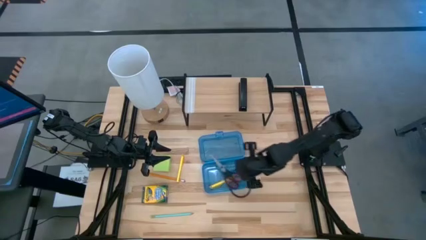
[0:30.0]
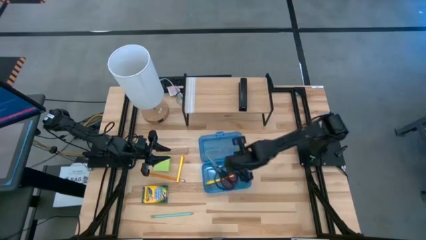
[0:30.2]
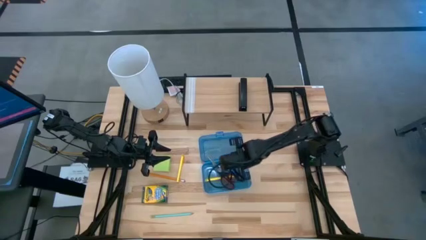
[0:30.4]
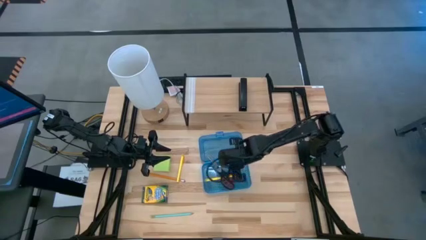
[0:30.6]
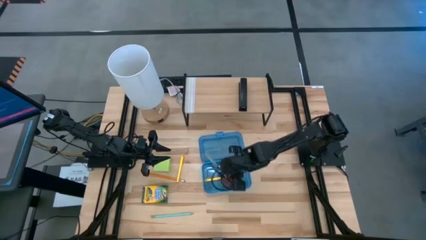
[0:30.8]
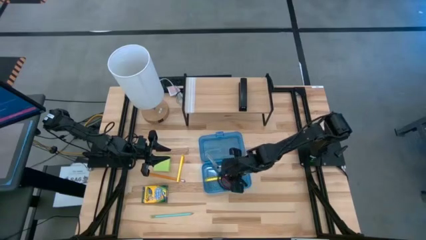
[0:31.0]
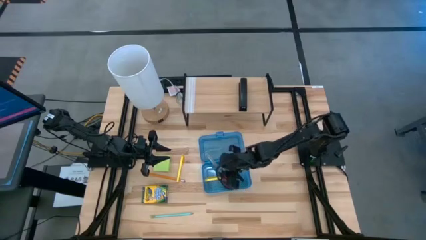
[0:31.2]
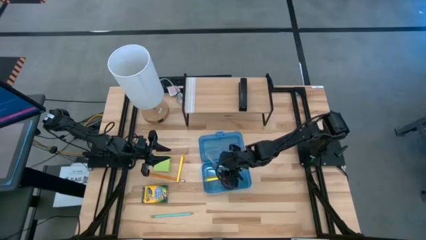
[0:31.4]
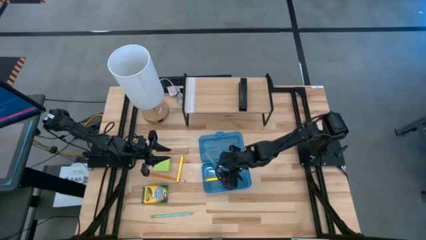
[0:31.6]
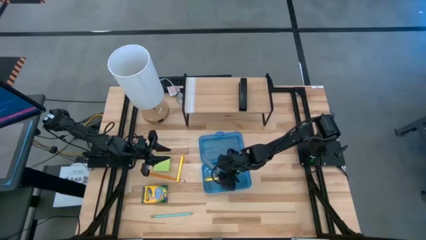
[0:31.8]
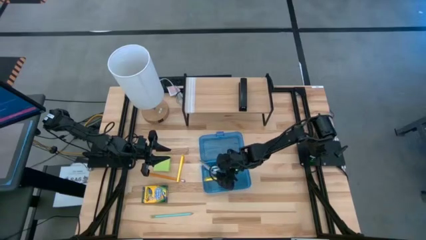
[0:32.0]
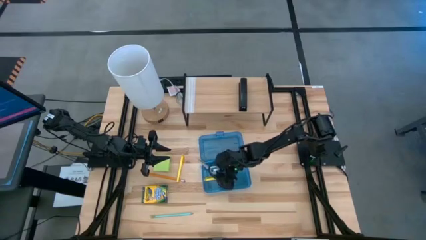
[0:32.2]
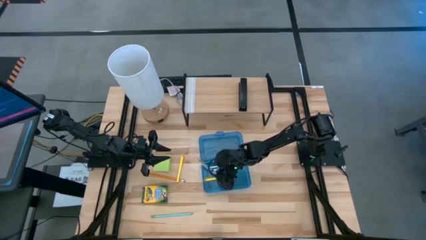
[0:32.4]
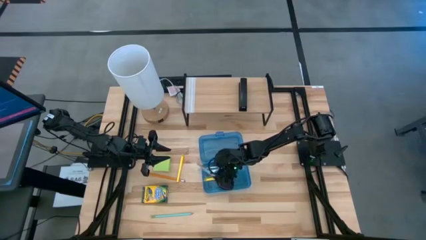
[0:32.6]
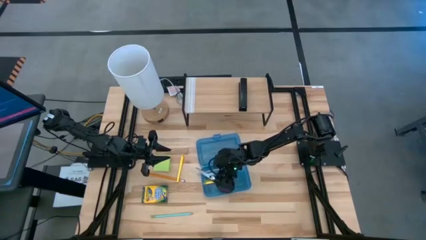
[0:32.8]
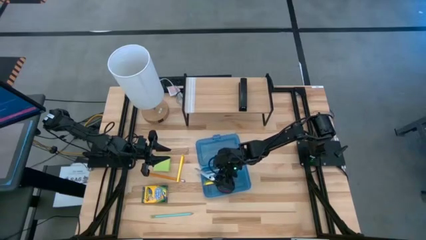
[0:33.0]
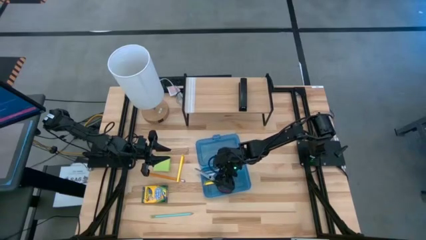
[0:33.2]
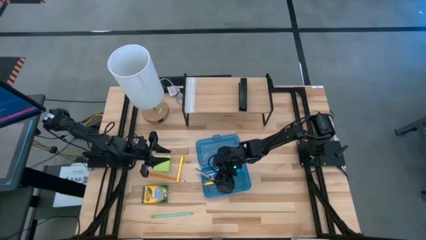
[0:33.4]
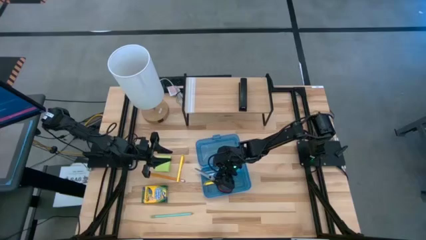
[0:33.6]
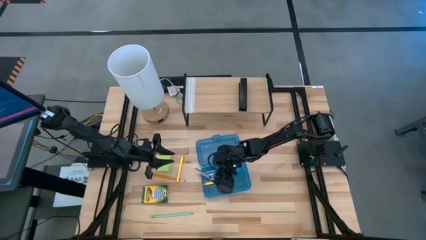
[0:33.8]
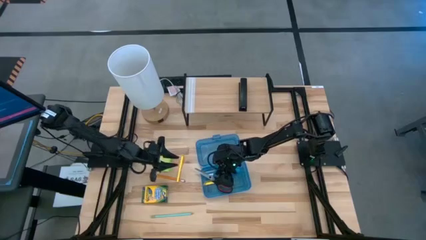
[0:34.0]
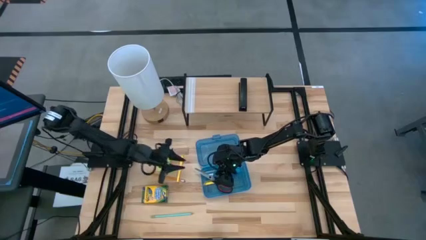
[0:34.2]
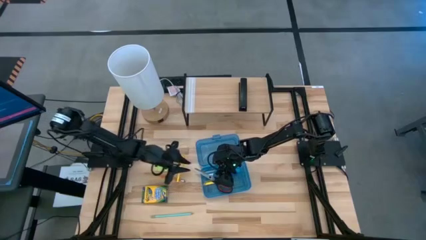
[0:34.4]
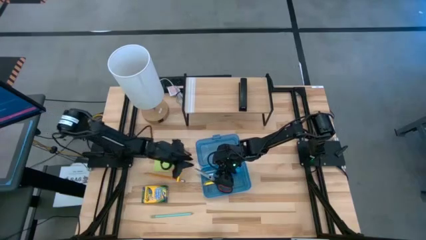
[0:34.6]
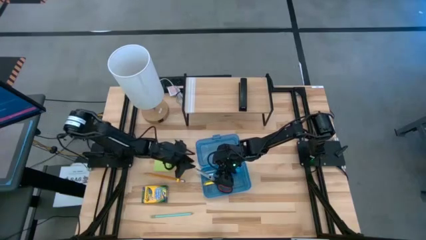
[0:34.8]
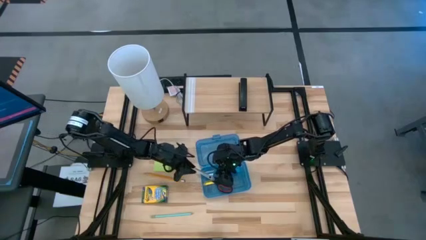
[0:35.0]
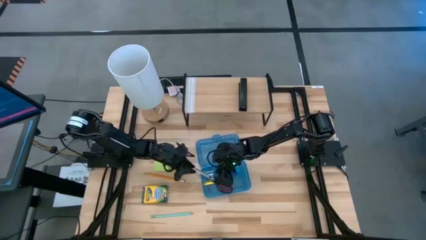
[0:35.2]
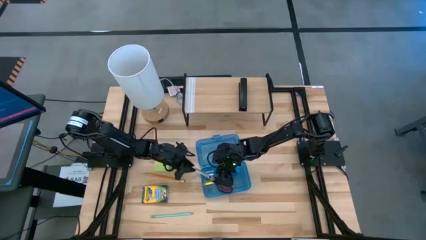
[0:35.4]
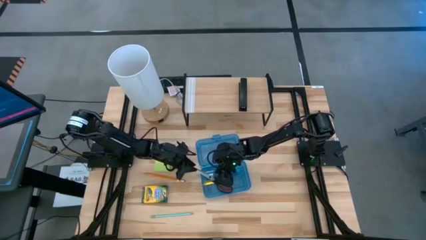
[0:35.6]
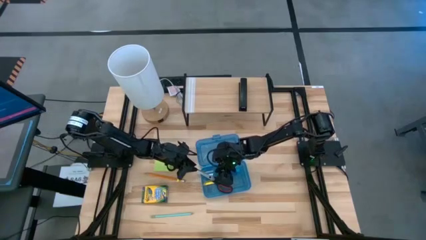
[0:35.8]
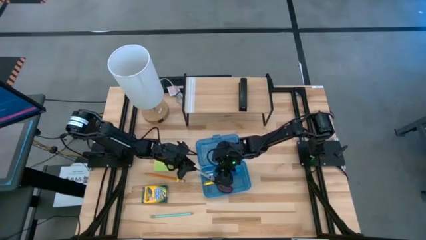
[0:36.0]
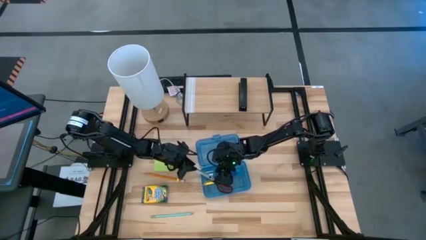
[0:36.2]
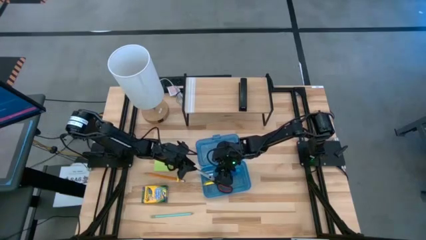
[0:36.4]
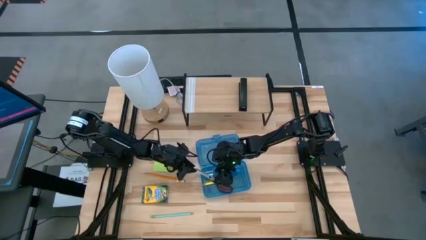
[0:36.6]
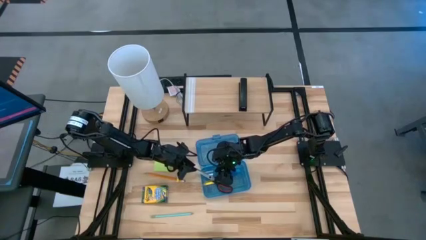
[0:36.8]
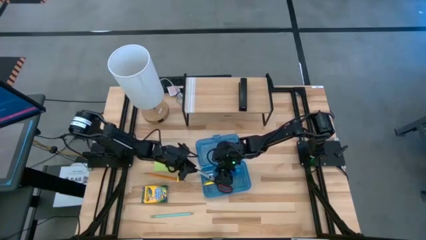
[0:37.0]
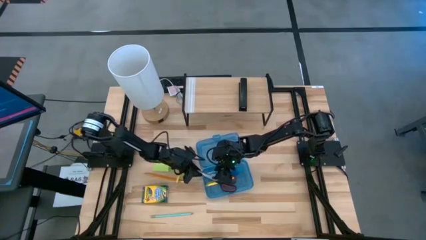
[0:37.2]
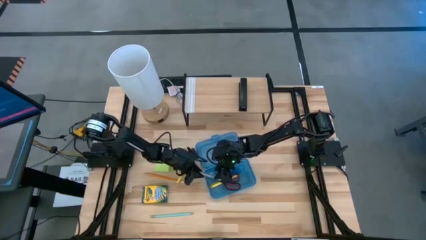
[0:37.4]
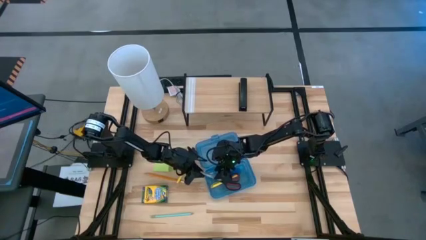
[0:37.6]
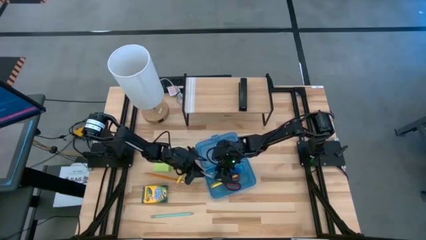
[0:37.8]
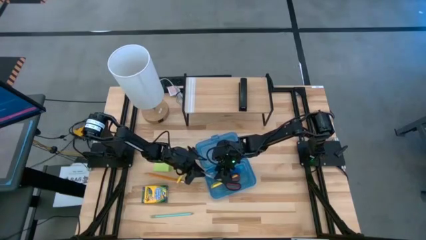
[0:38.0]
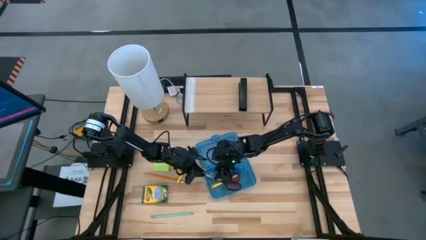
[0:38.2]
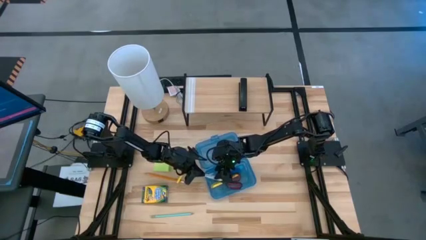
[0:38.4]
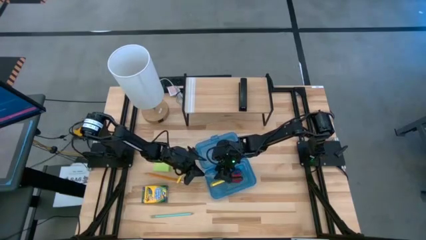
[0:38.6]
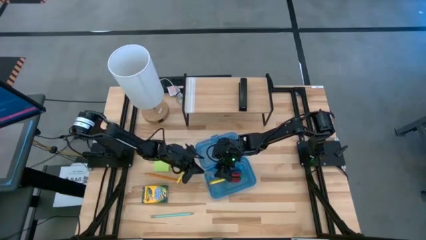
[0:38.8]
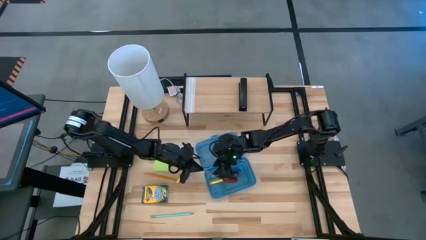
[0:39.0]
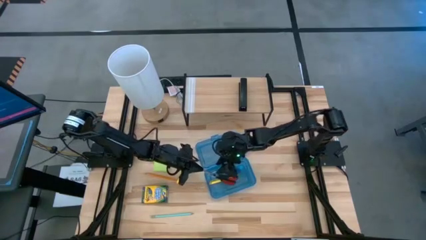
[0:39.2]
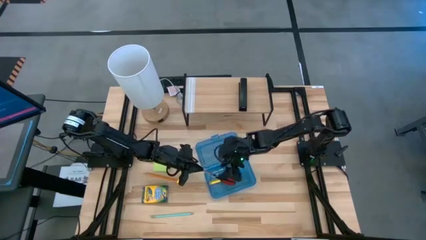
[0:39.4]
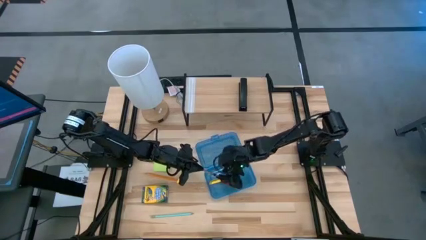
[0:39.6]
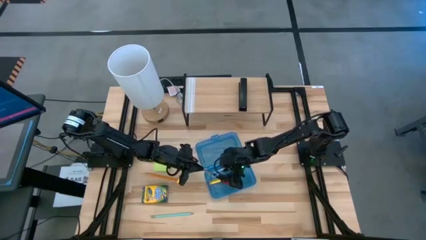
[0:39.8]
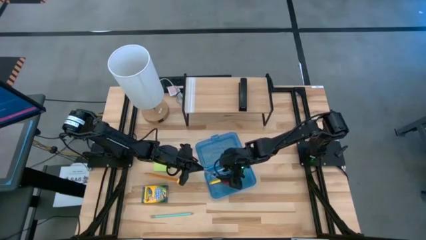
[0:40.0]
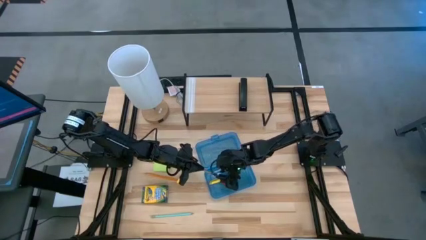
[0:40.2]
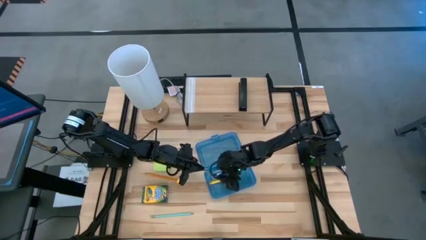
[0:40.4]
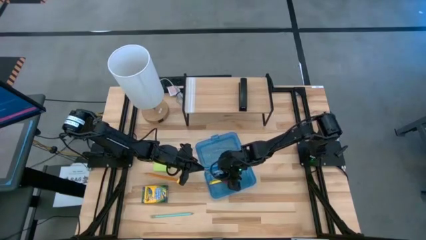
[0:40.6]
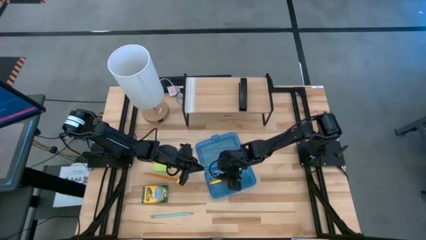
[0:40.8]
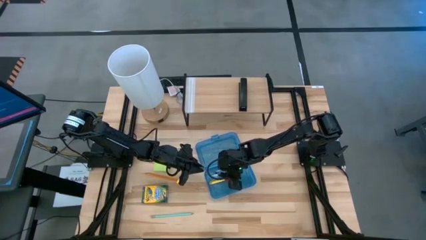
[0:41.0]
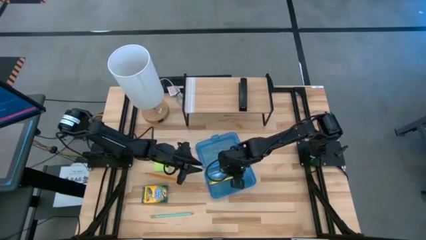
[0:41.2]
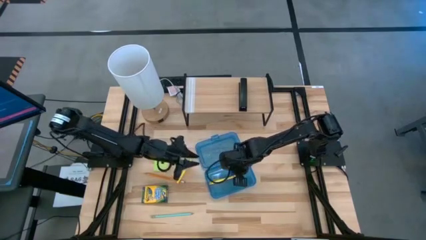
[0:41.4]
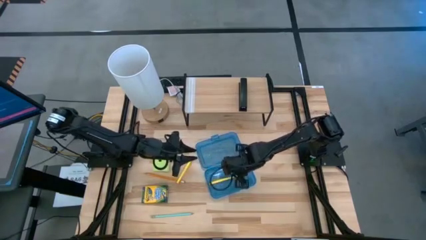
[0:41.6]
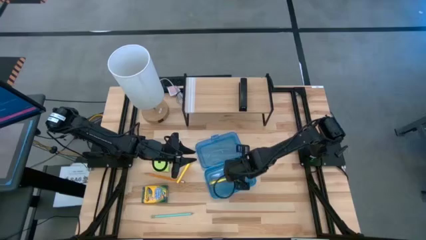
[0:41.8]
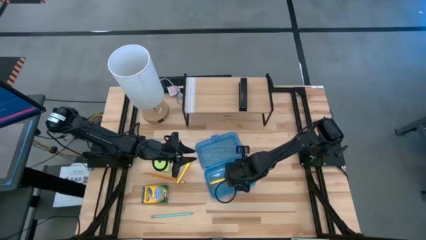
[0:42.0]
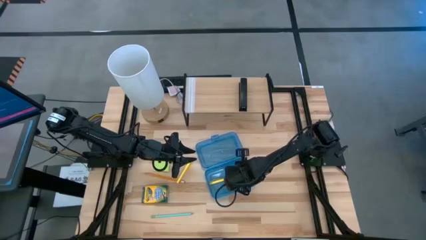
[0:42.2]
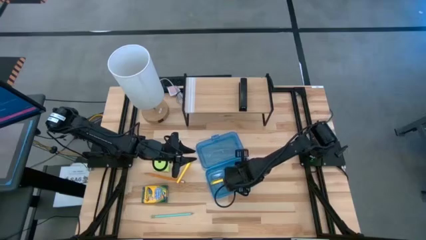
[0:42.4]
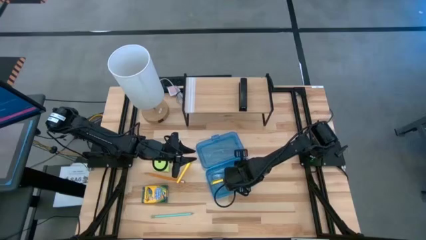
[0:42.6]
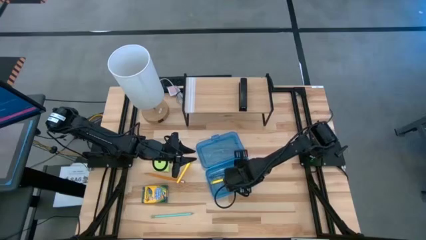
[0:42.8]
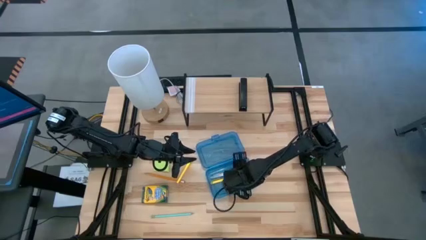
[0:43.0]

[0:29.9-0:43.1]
Task: Pack school essentials
Put the black scissors into the blue supply box

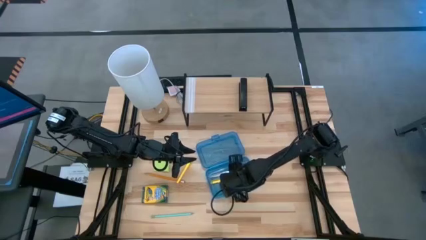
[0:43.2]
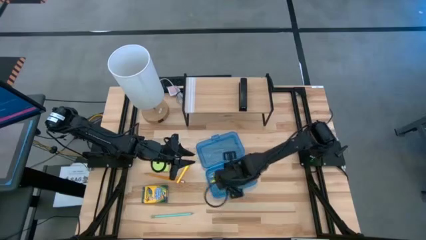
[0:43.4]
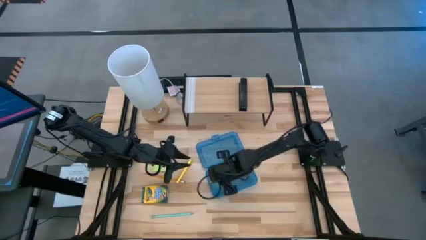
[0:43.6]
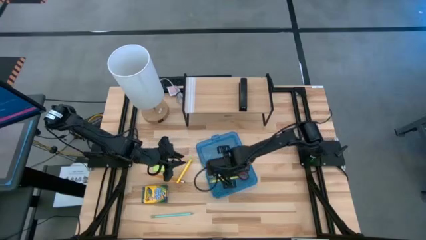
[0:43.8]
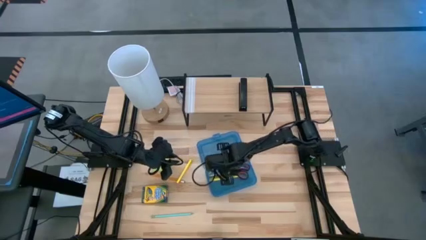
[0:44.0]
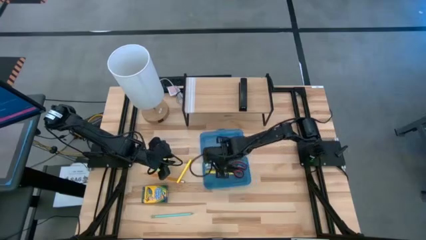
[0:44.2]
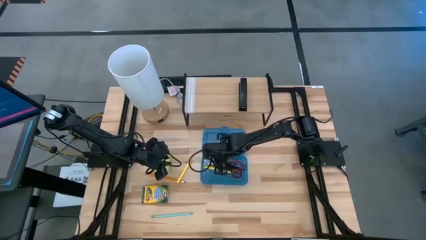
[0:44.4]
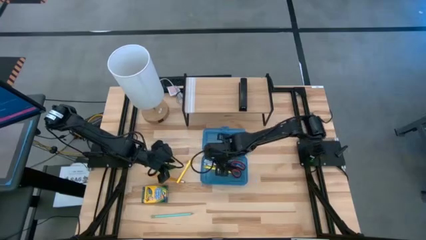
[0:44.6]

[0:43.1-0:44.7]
Adjust the blue supply box

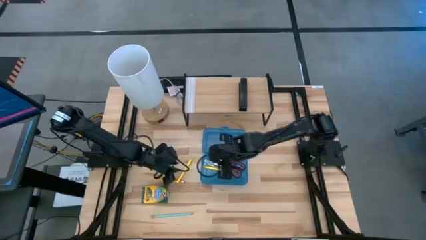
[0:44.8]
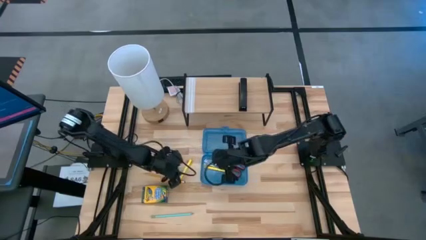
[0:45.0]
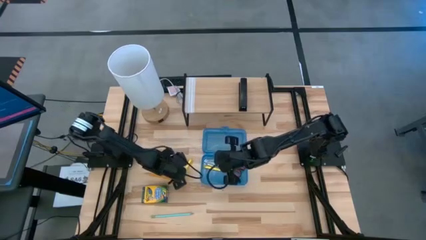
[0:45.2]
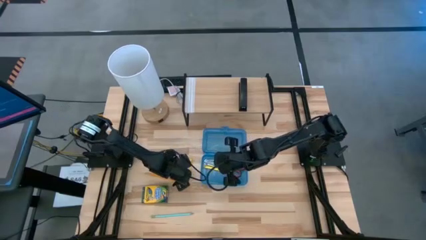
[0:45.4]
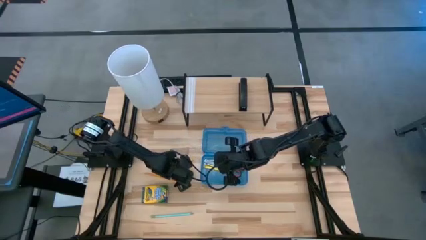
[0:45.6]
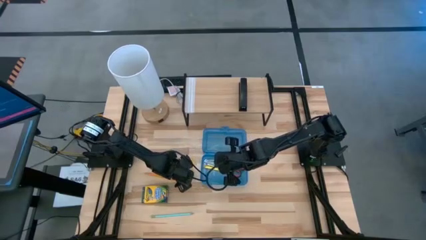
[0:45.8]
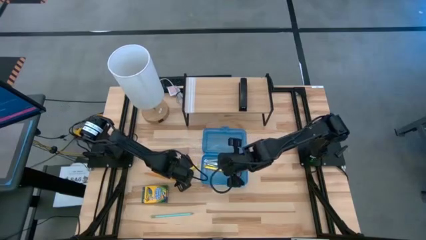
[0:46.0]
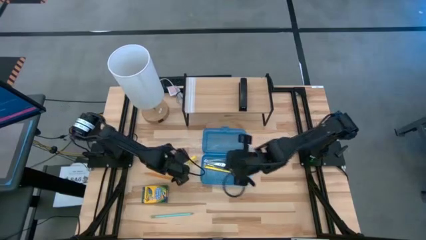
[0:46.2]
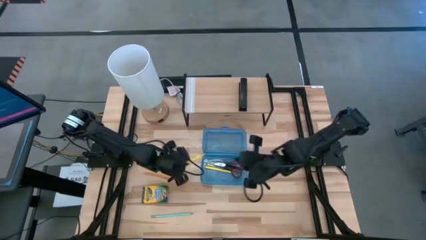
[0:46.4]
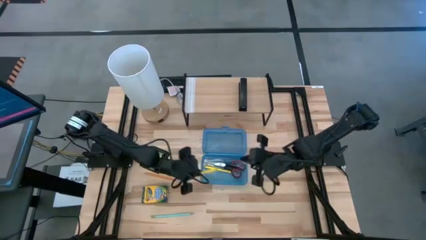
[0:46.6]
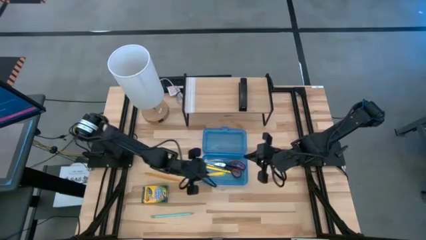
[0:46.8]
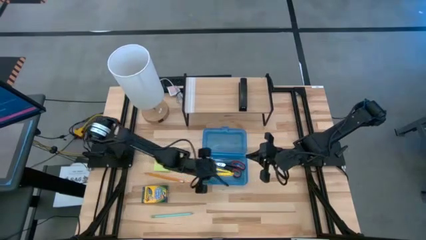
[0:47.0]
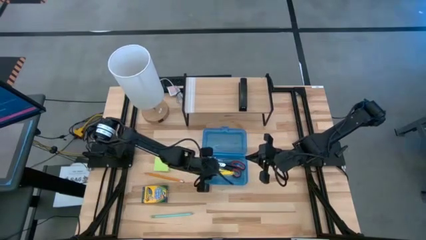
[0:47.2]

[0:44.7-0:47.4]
Put the yellow pen into the blue supply box
